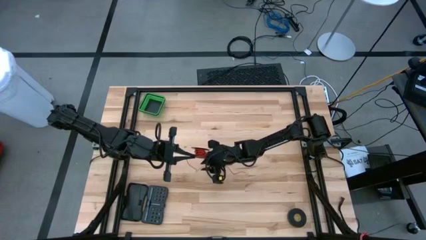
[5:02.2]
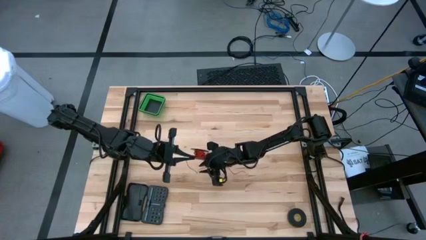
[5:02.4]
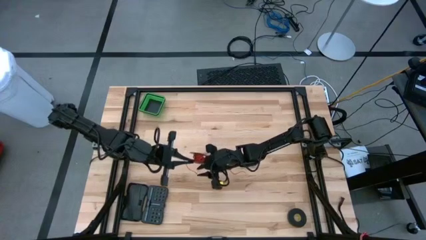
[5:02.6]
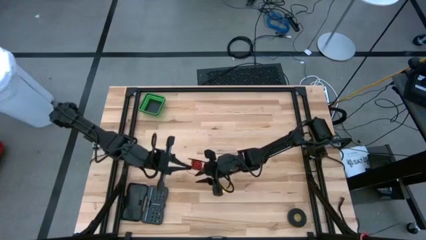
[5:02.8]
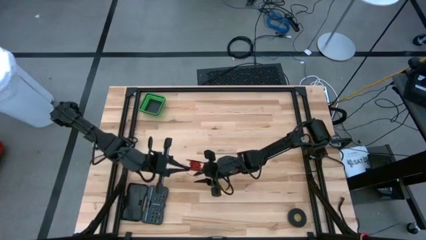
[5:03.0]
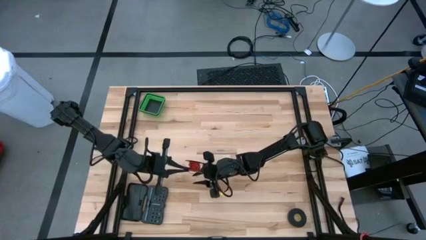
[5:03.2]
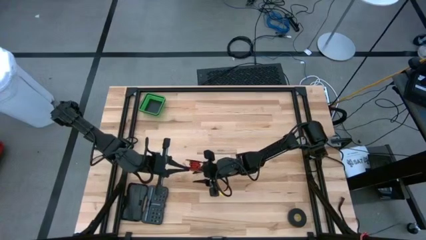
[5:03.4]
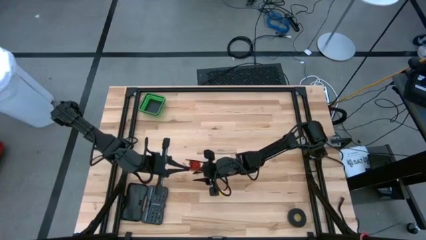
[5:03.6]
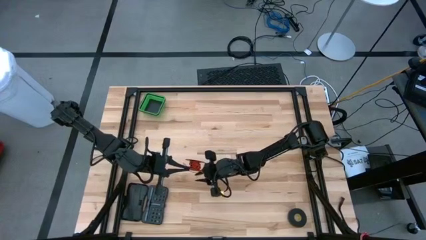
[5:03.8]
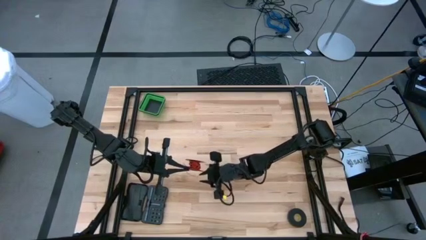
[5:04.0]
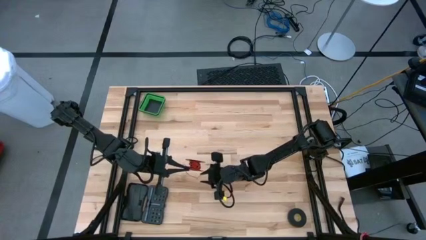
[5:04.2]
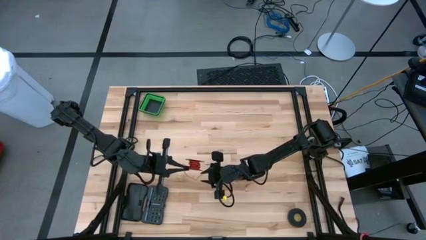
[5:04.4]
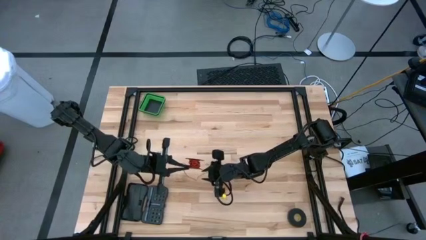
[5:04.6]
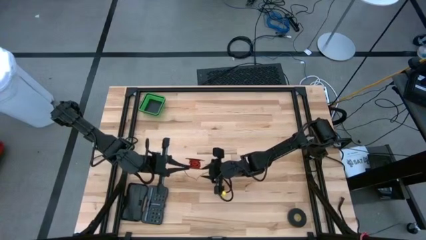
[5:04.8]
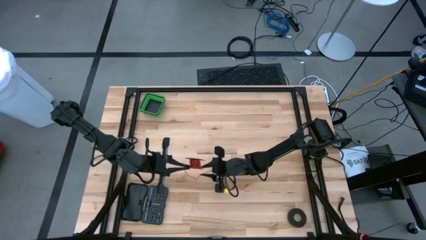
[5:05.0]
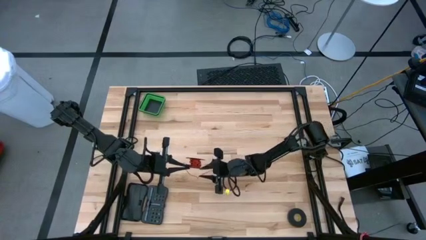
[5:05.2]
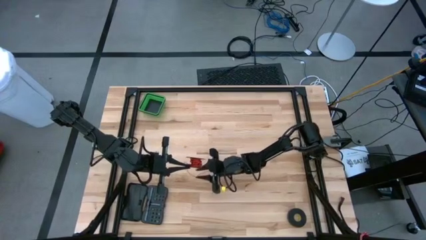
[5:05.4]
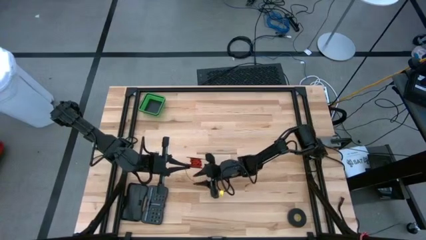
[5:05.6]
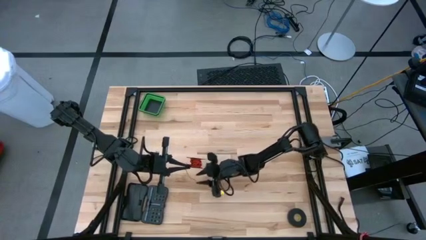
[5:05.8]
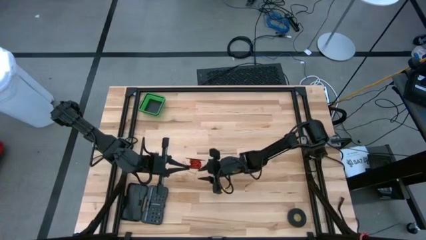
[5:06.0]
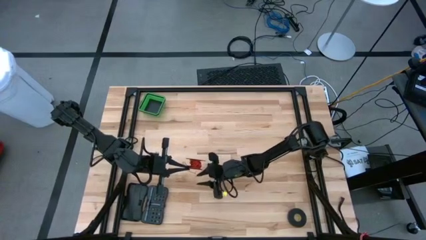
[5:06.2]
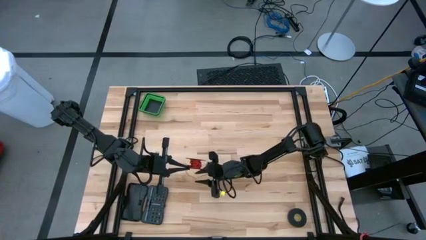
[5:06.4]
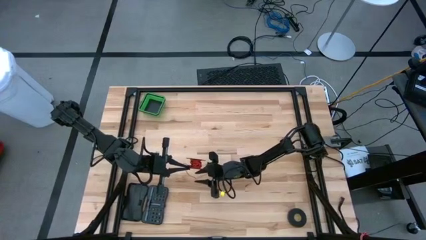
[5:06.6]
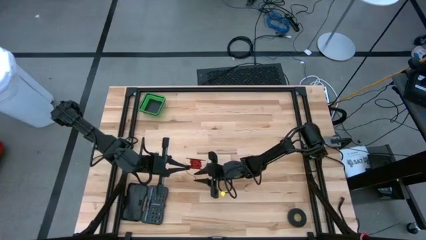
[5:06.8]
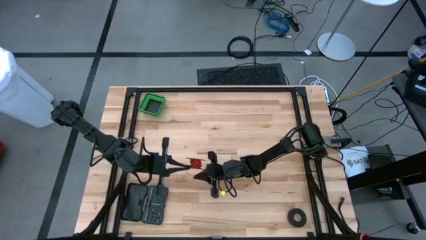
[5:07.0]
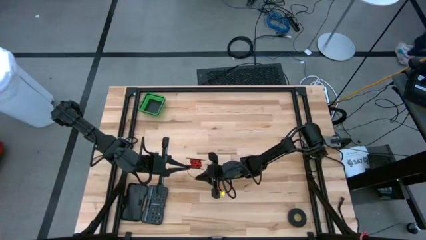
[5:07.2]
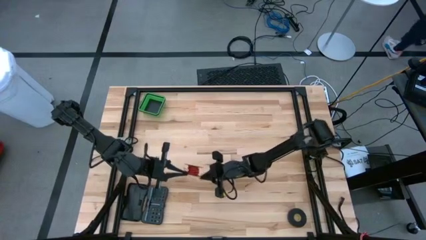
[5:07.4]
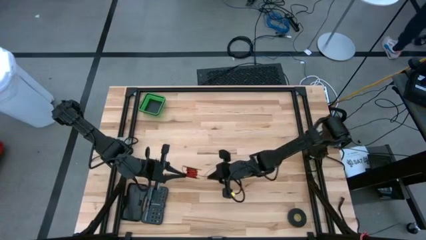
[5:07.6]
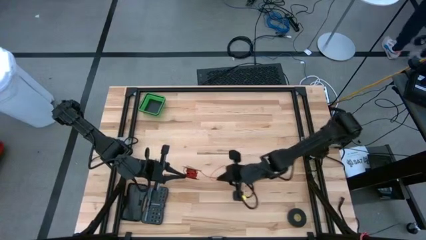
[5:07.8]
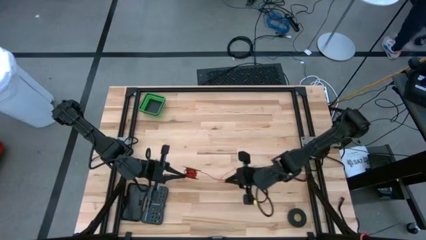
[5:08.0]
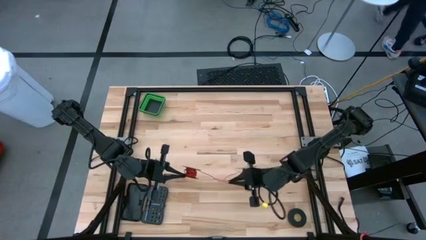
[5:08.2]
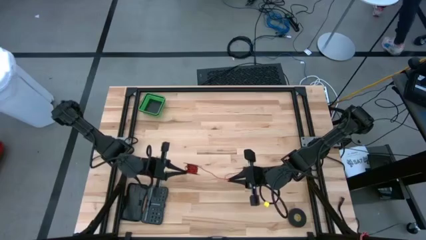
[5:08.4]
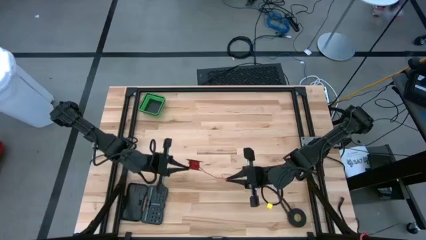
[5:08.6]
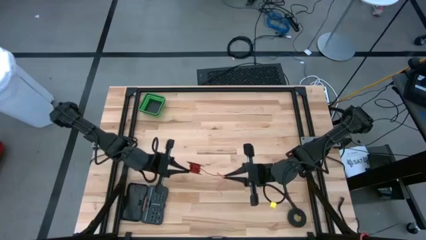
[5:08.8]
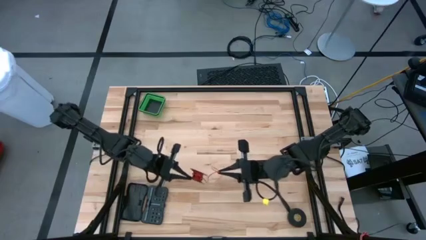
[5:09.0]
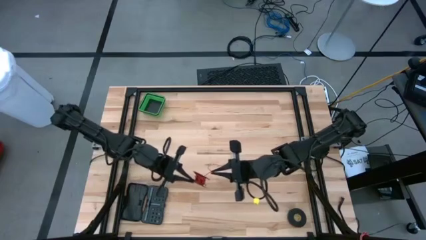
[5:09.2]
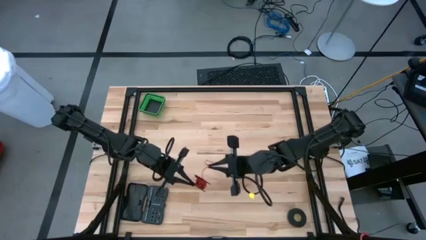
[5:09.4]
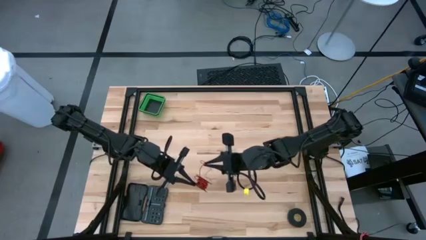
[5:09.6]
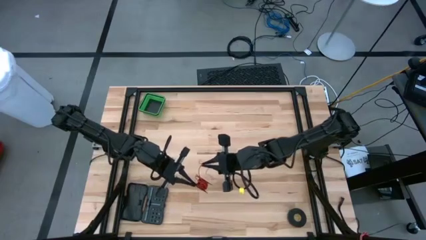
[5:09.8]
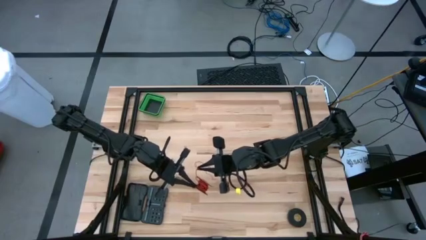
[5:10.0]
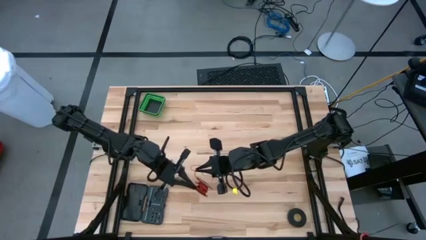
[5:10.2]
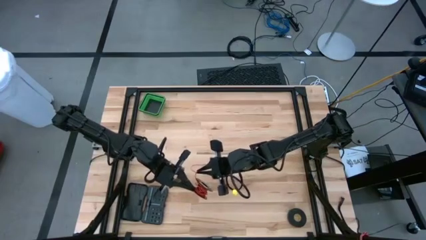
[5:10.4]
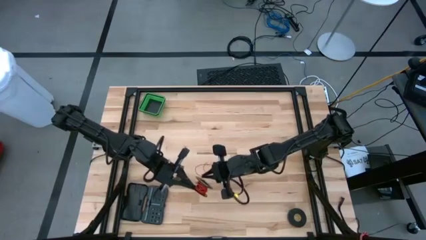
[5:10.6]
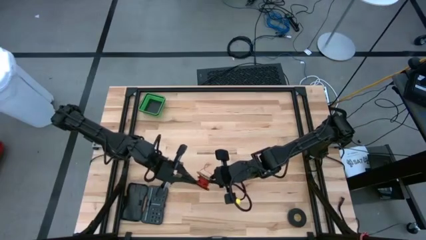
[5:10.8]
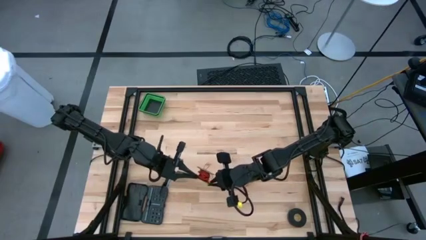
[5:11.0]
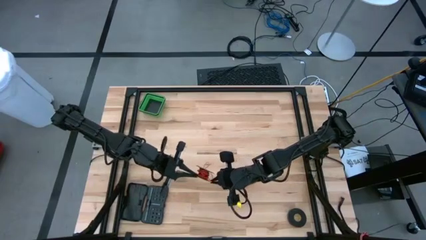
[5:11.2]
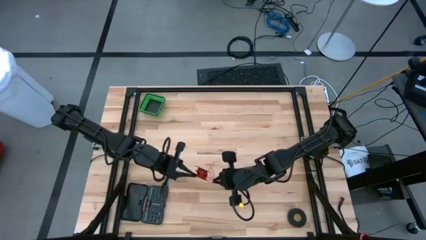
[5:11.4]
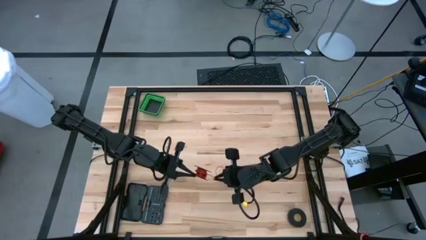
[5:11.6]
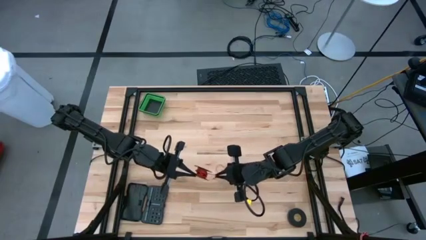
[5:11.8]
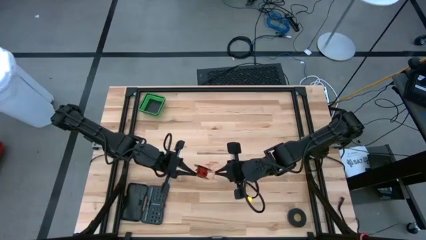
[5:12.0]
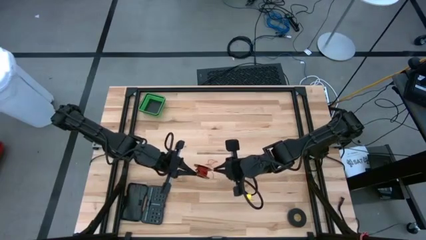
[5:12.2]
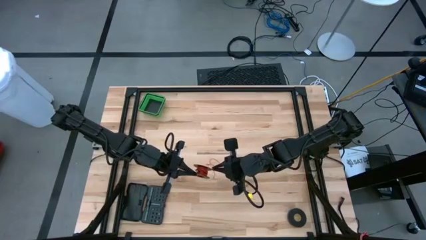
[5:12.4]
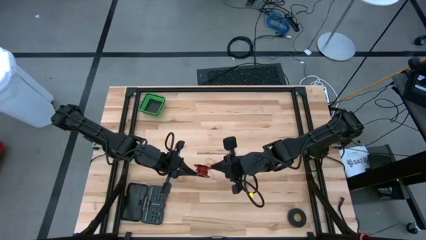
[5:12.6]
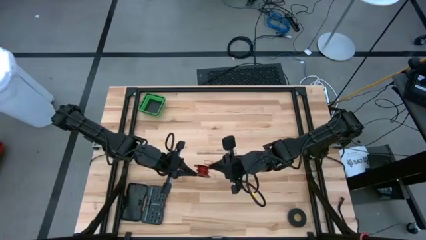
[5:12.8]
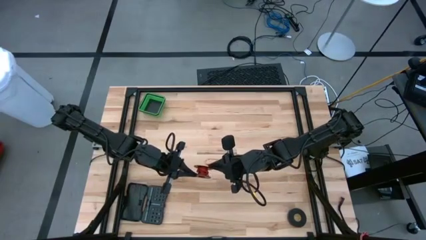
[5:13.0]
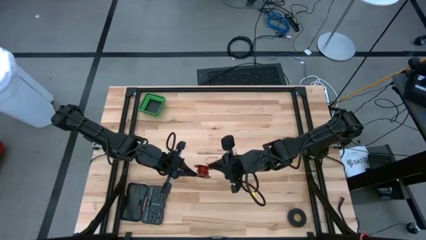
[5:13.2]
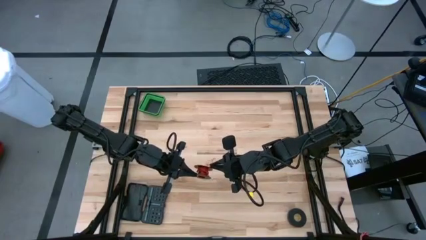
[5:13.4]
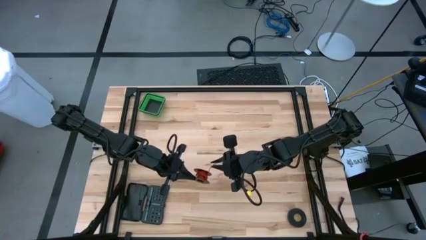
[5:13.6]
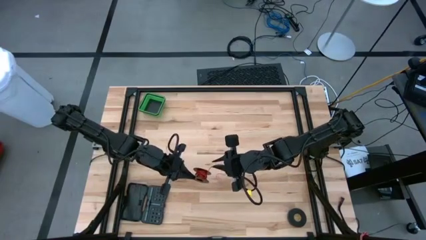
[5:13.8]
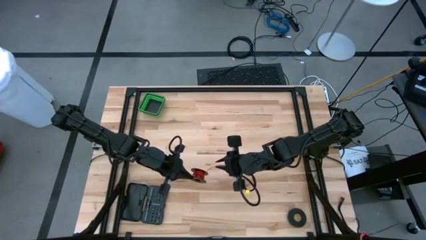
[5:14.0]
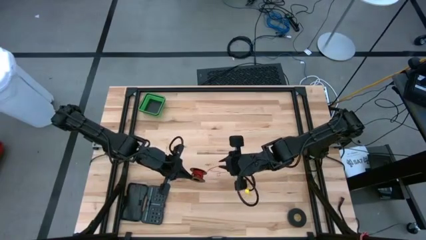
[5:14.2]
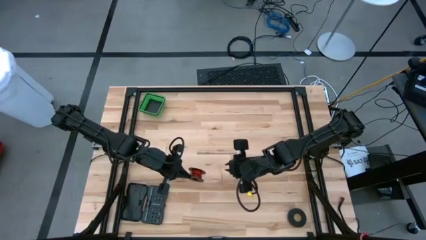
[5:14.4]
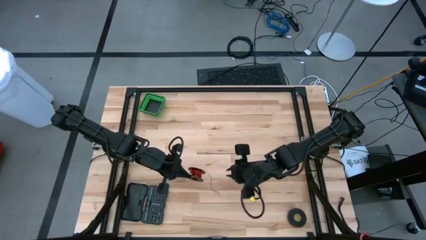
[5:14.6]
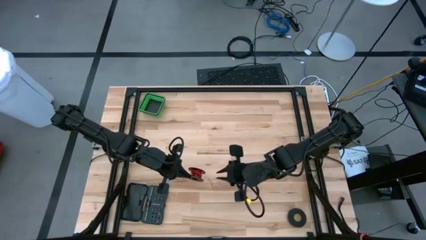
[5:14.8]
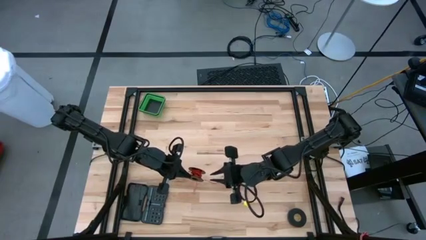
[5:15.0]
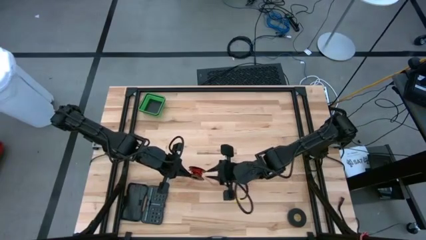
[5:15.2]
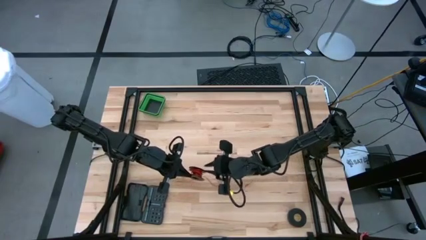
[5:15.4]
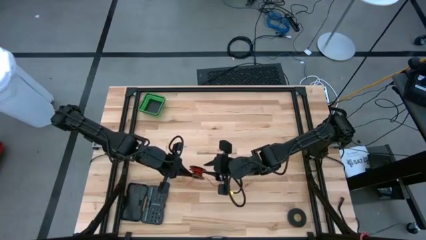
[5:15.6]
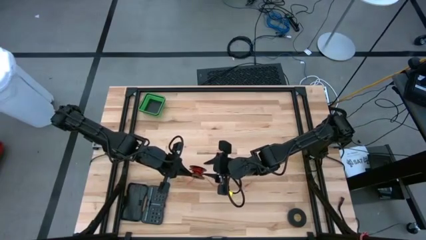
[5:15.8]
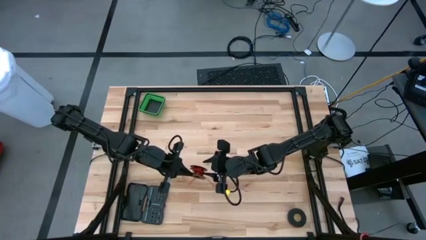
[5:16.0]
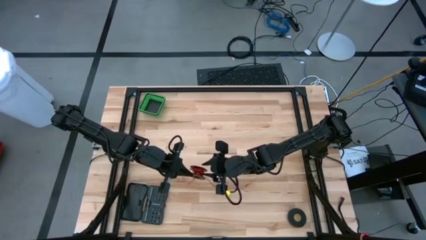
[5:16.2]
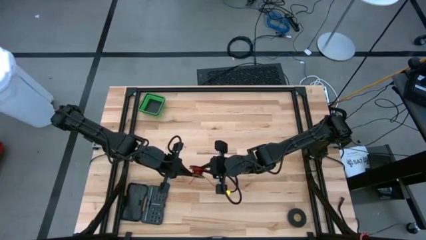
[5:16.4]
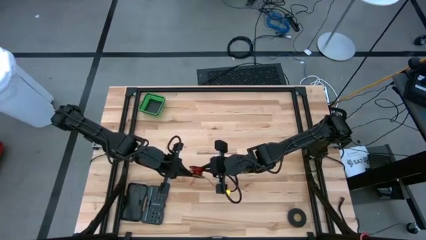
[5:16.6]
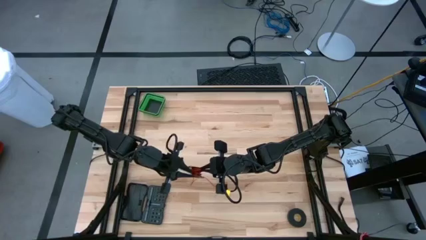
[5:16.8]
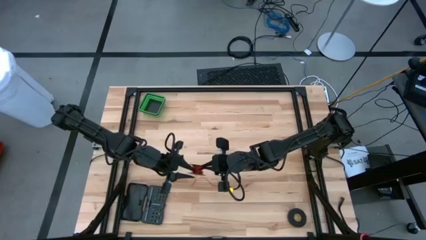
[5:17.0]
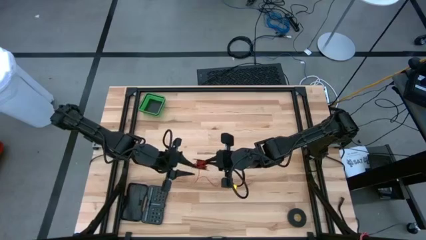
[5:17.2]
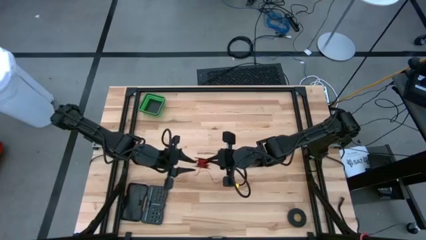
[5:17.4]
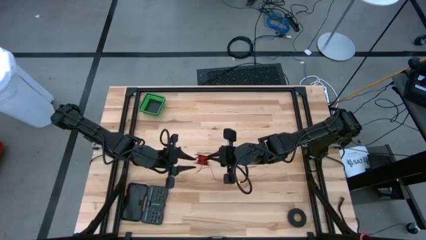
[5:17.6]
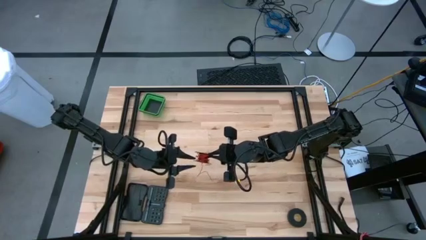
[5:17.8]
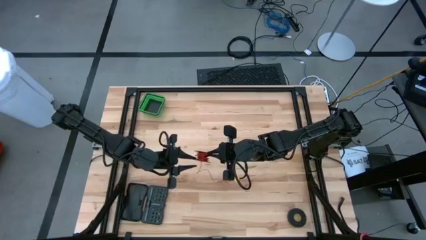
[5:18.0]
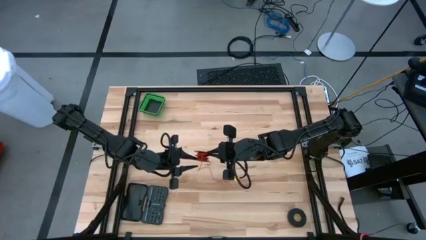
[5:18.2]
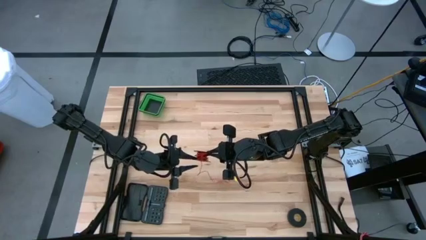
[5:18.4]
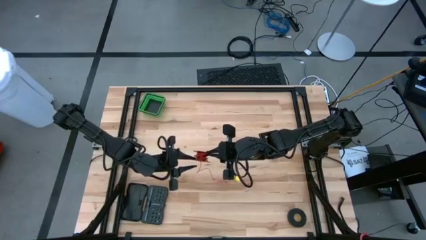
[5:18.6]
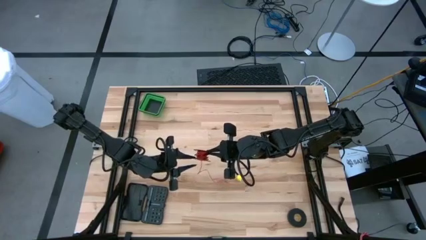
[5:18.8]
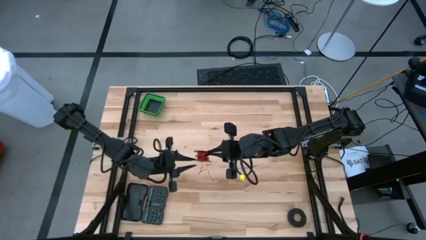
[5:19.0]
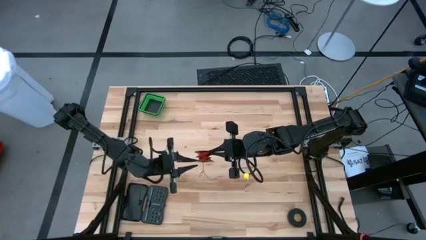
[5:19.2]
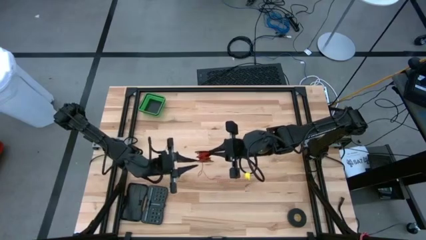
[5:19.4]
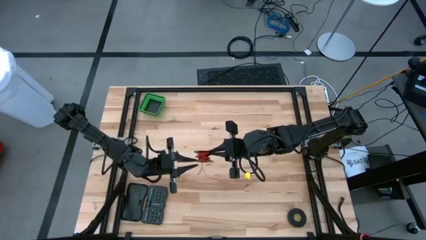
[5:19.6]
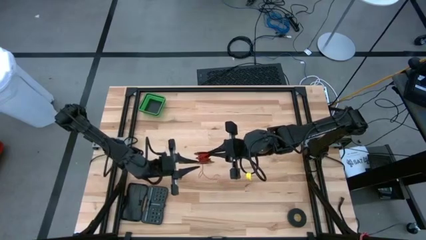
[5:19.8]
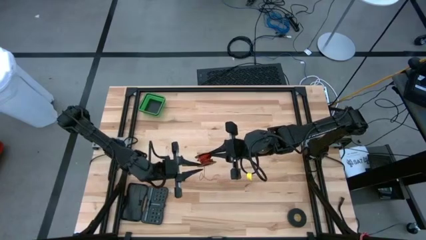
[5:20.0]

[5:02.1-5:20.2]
Task: Coil cords
Coil the red wire into the spool
